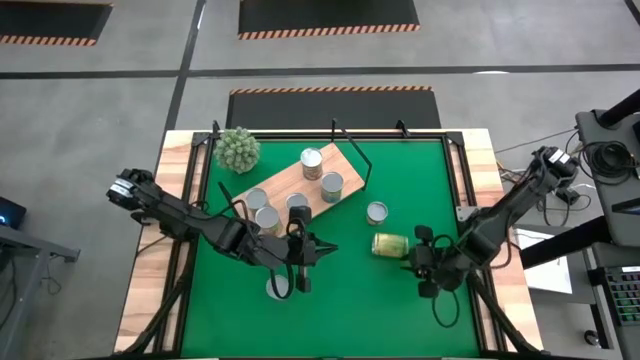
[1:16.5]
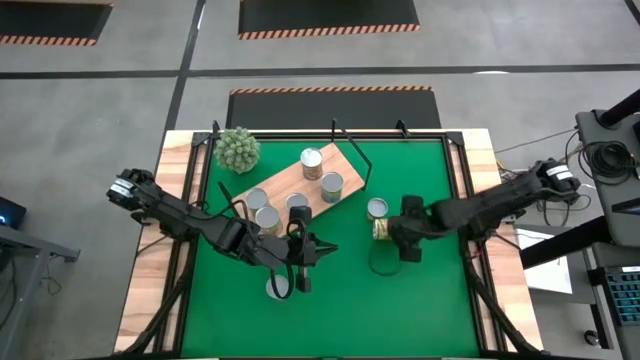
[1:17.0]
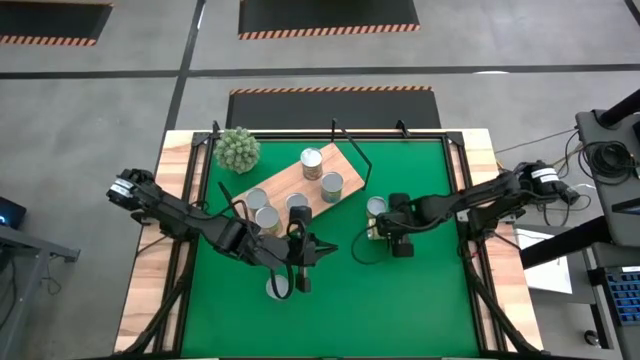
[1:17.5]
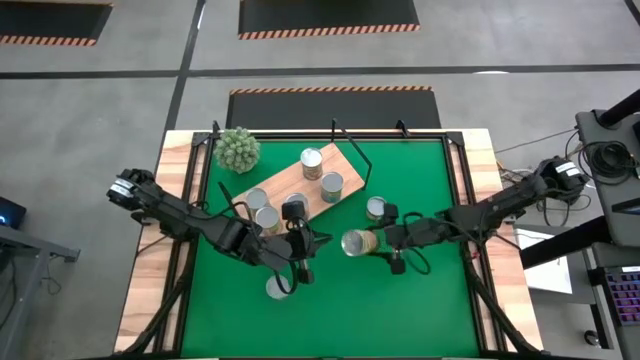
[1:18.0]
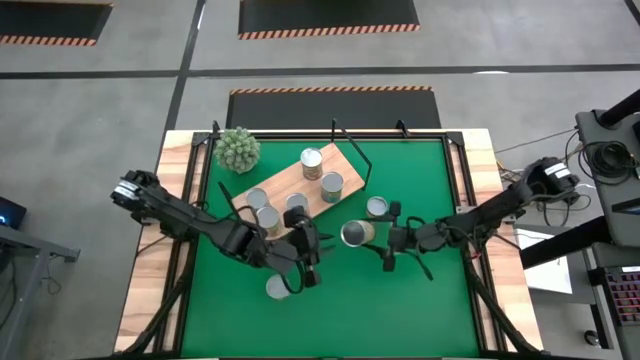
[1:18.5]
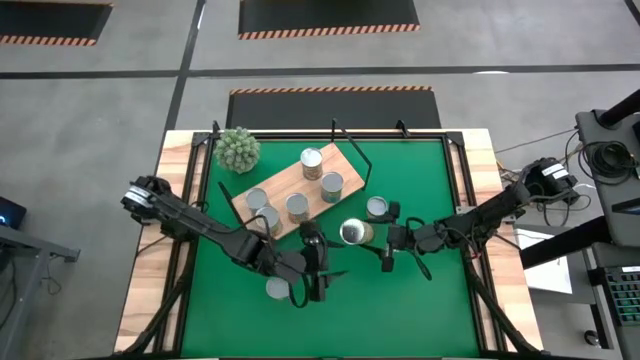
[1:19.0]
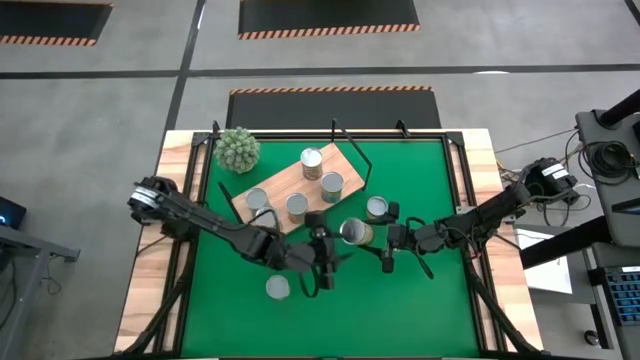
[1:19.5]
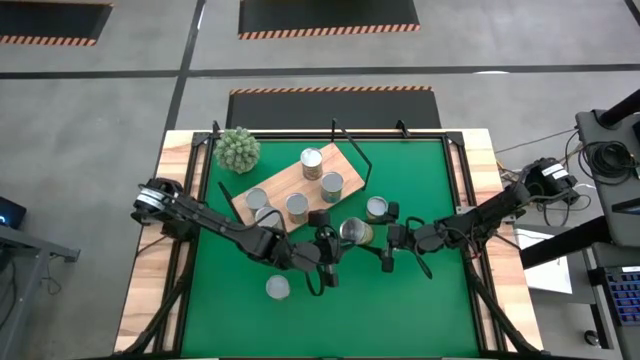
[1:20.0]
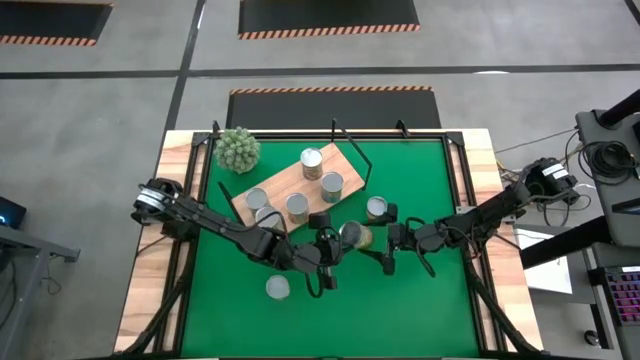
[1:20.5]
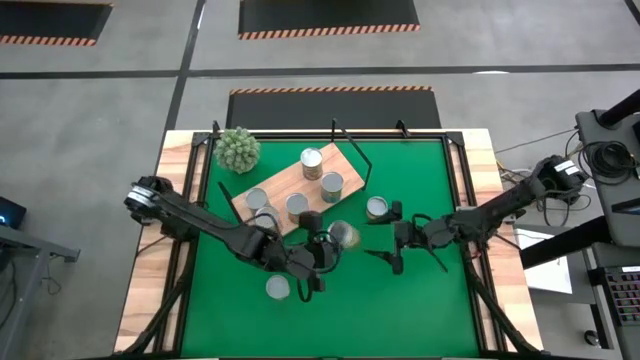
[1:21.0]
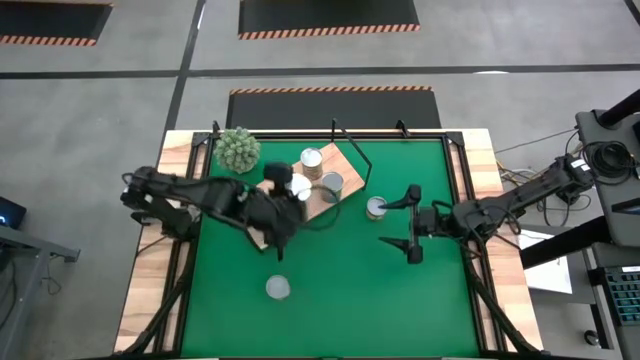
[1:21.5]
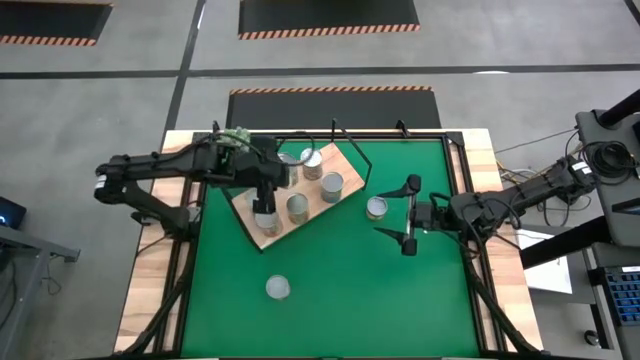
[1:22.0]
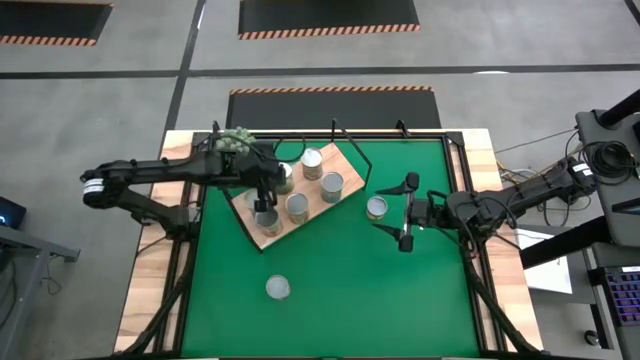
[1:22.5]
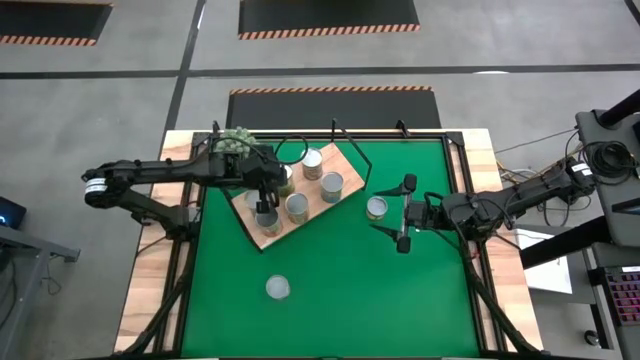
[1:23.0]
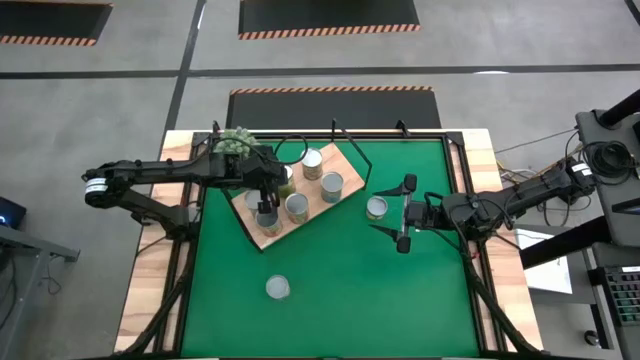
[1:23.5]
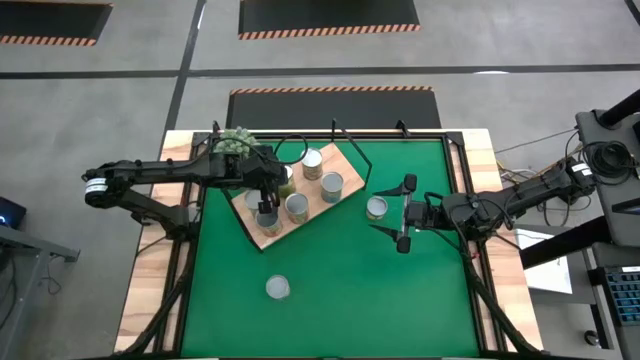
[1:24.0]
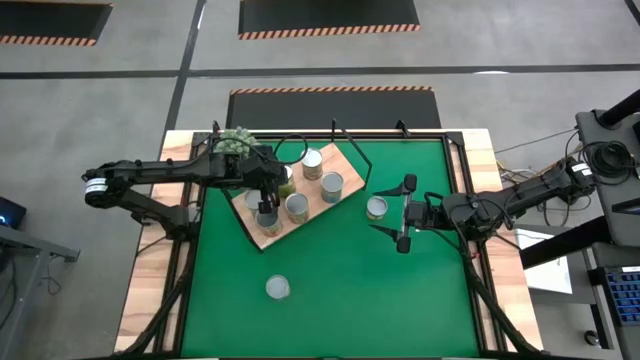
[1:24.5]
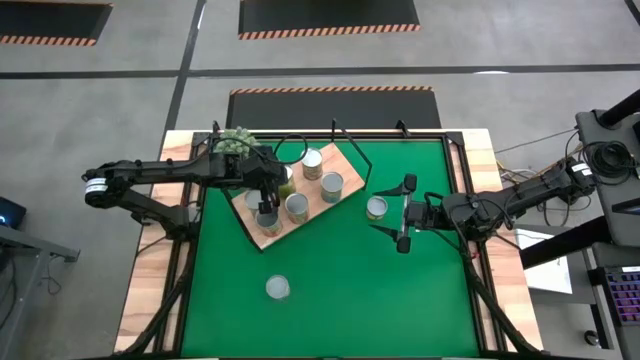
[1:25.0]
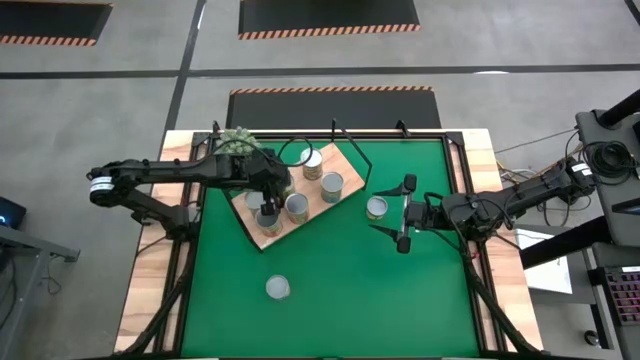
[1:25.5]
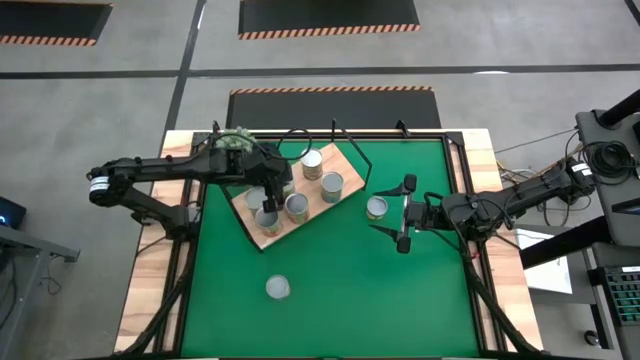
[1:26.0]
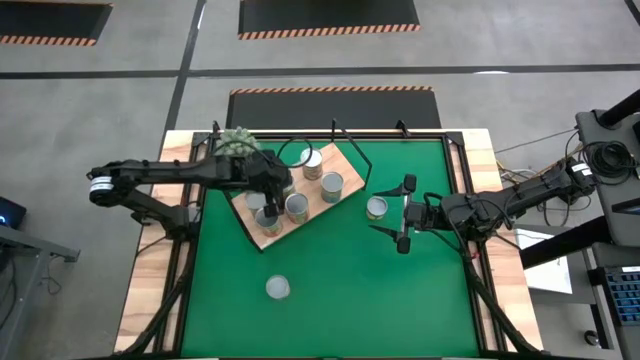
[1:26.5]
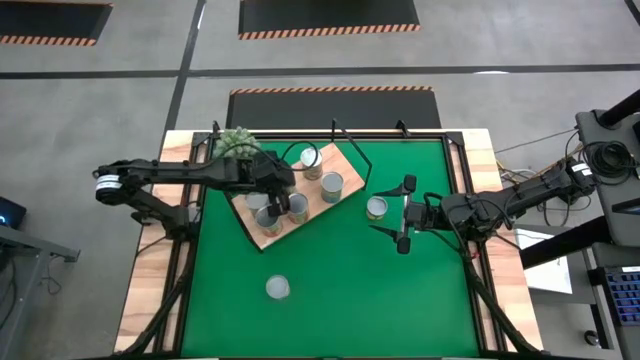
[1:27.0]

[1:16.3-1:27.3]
Task: Pick and place cans onto a shelf
Put the canned peaches on the shelf

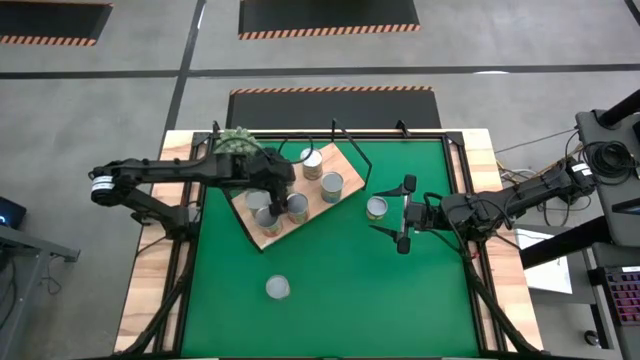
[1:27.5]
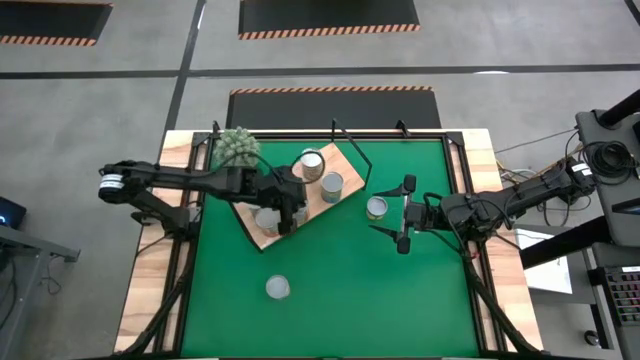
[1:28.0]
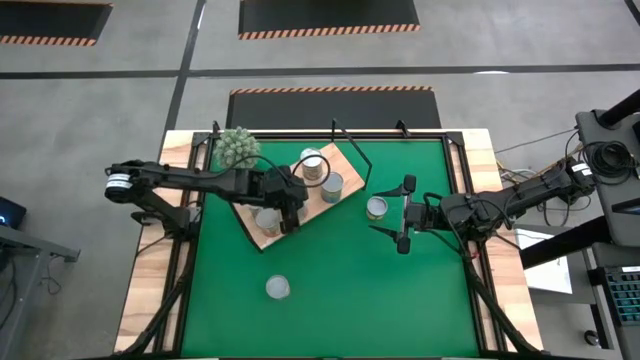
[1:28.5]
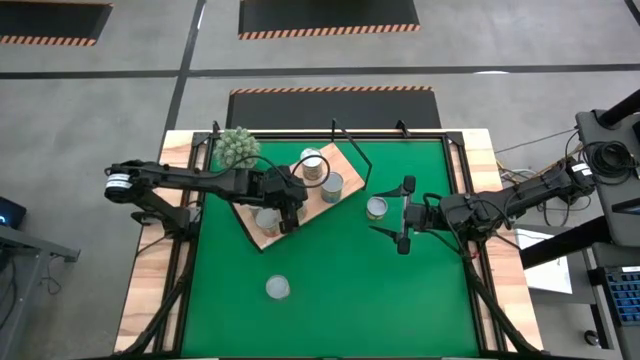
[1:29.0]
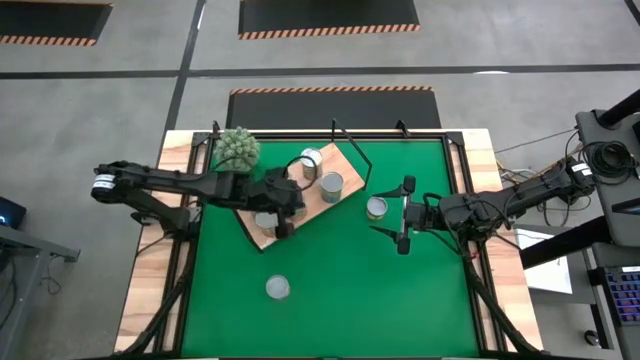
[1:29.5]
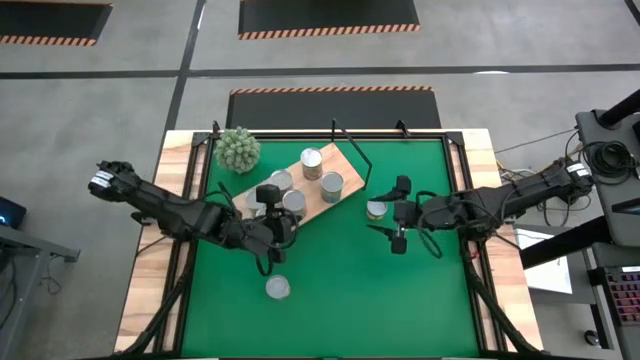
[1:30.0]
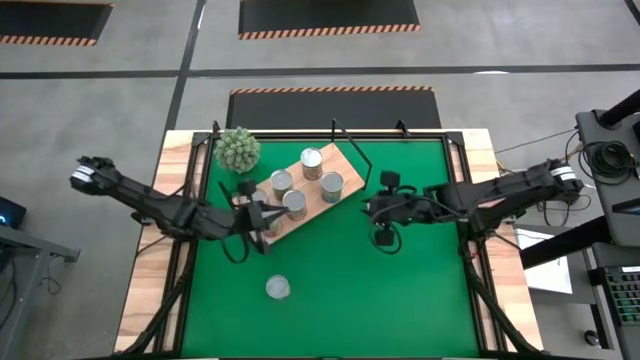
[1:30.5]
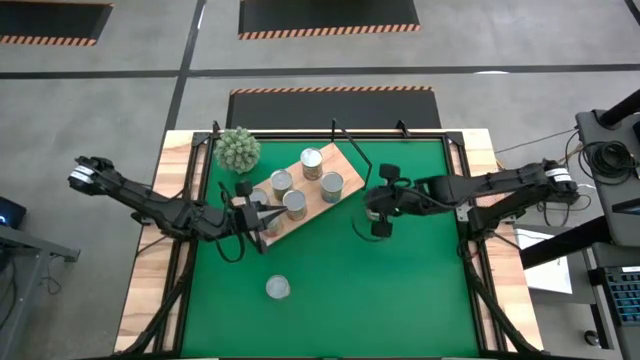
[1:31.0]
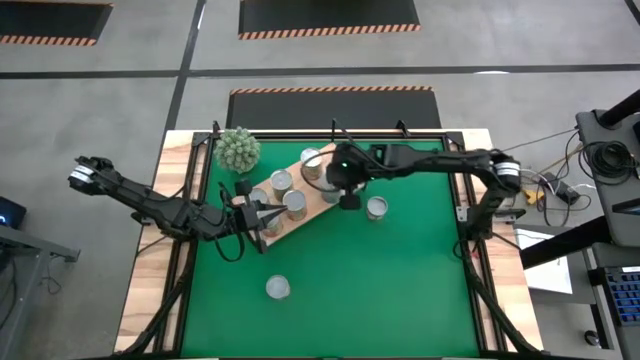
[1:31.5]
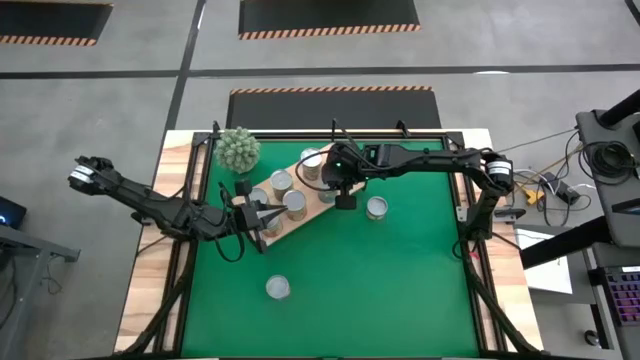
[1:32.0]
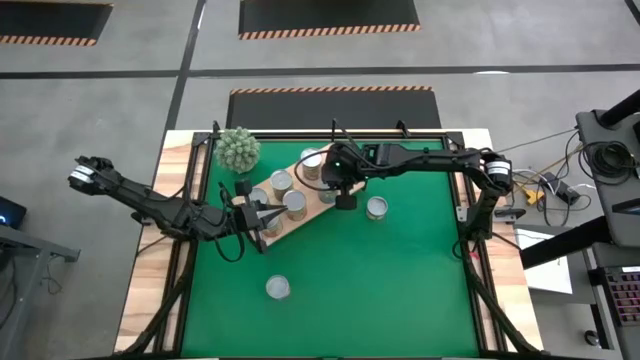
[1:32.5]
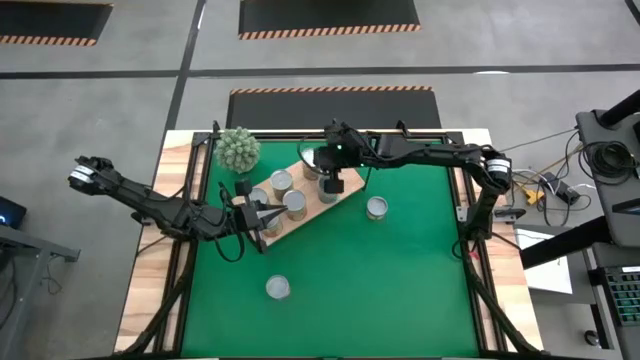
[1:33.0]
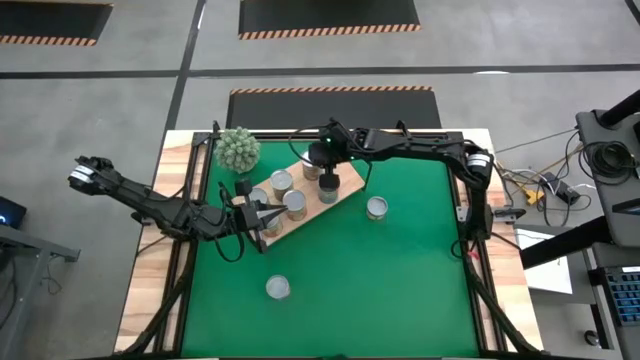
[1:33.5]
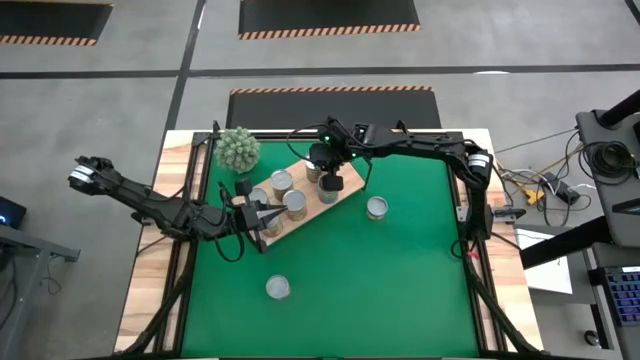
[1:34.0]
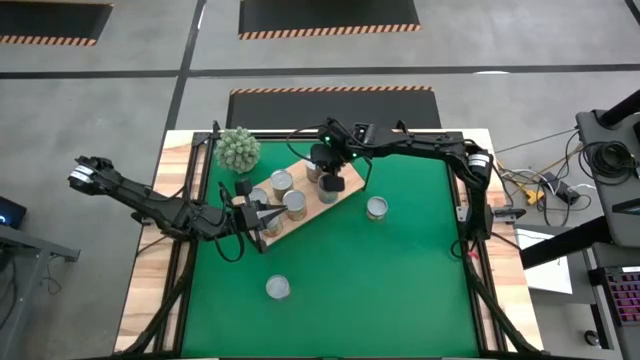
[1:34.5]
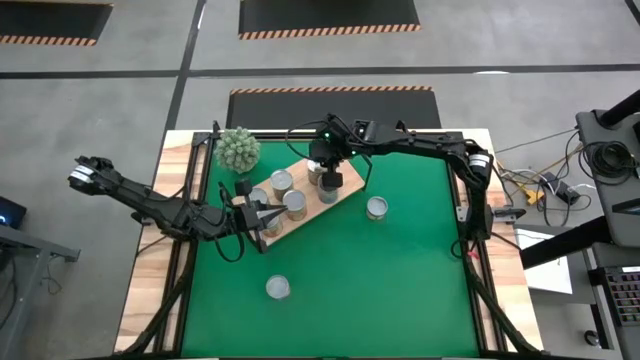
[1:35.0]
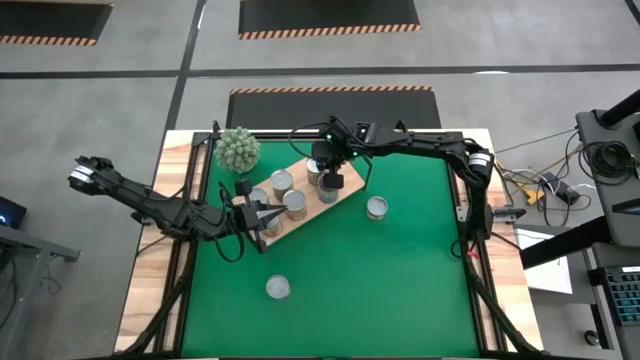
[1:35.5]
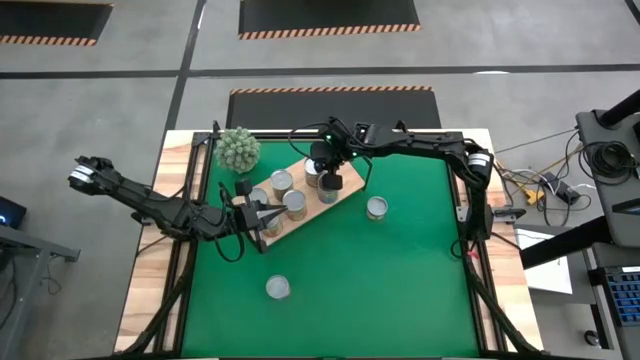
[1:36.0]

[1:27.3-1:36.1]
Adjust the cans on the shelf

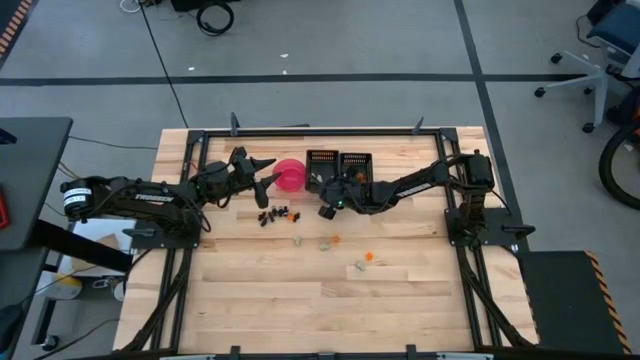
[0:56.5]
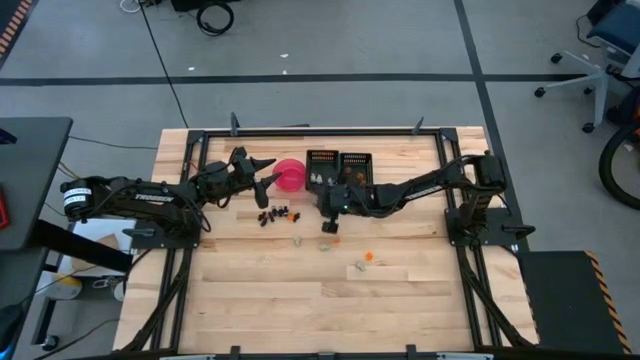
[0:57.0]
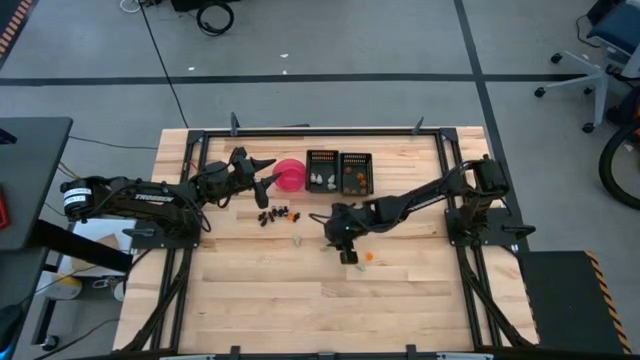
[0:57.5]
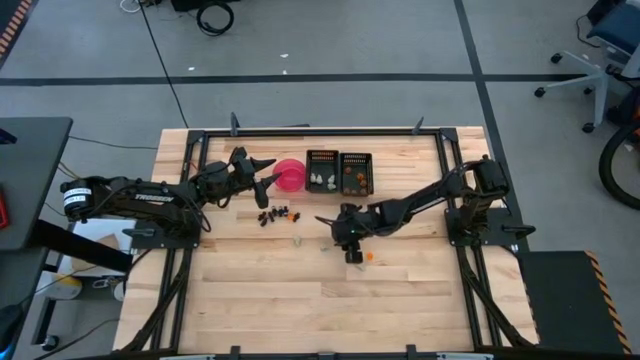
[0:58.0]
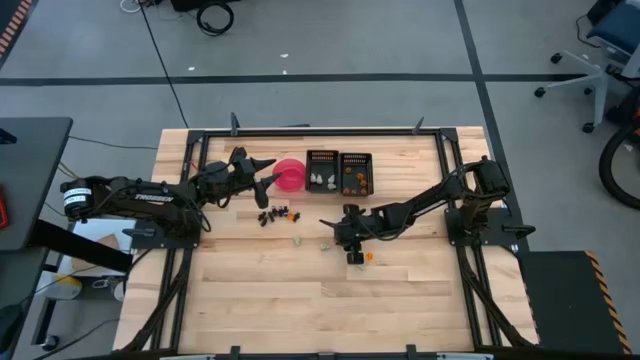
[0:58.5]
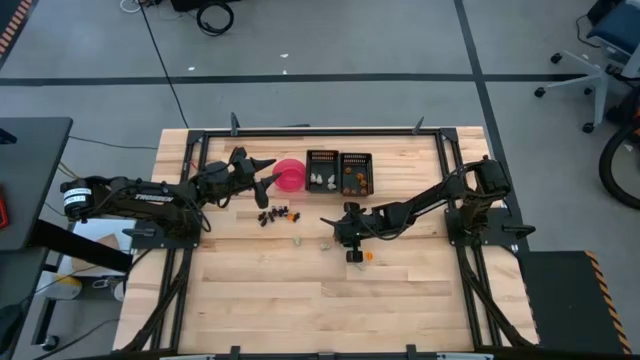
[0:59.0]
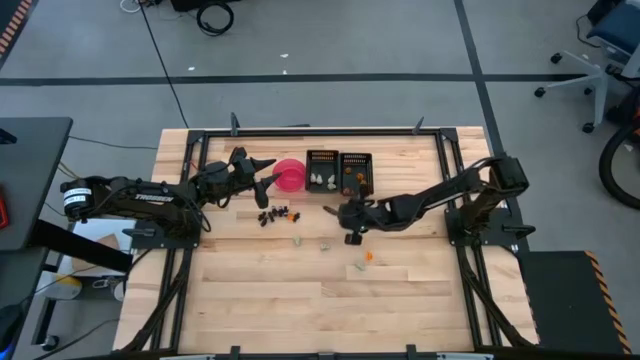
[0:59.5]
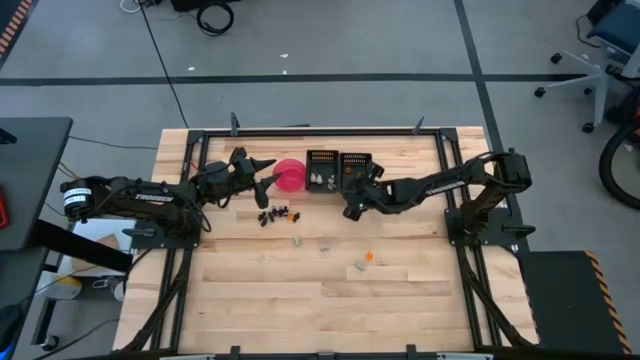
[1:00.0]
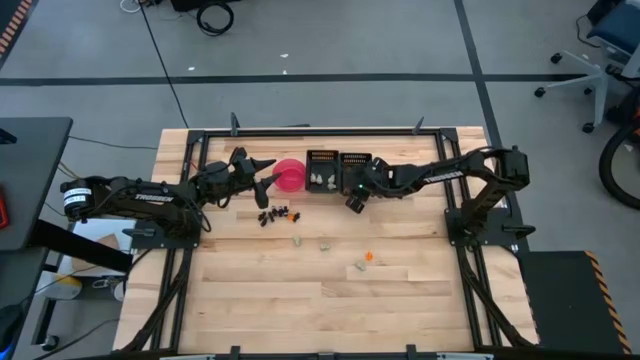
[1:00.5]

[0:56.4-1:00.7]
Task: Sort Halloween decoration
Put the orange pumpkin toy into the right black bin
